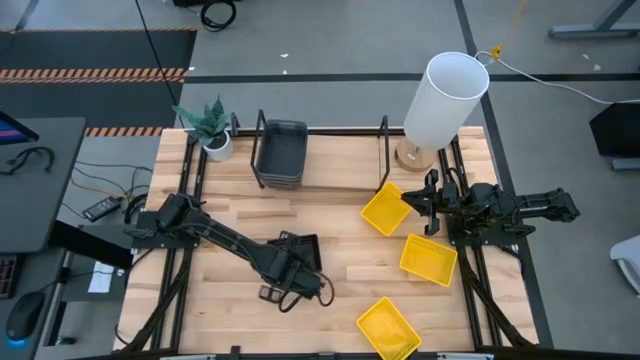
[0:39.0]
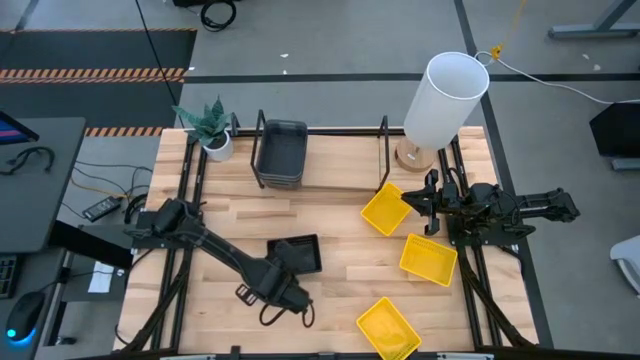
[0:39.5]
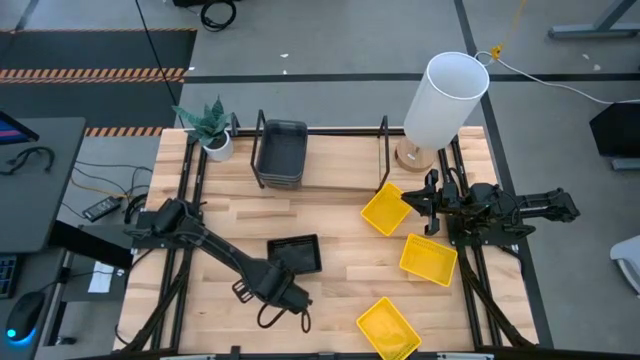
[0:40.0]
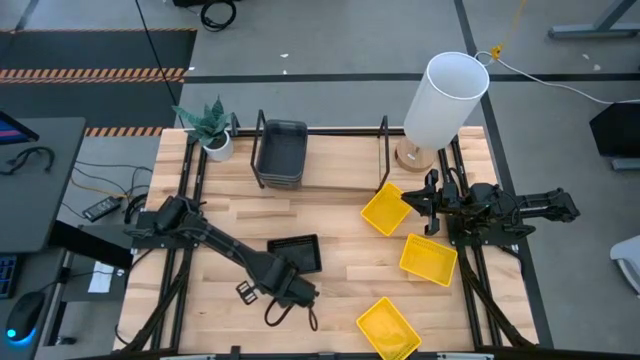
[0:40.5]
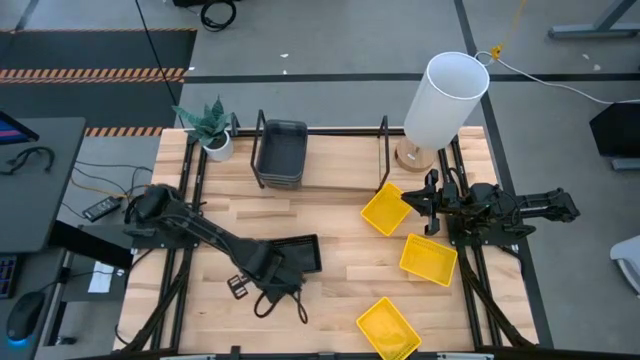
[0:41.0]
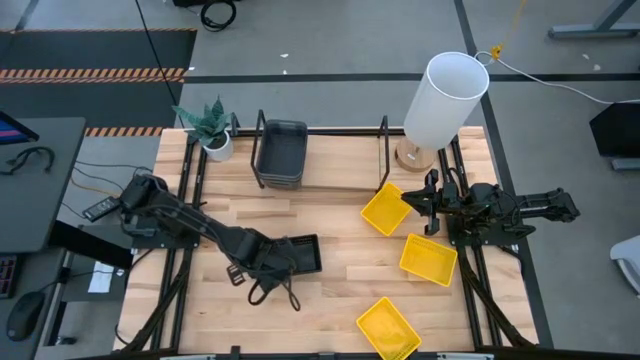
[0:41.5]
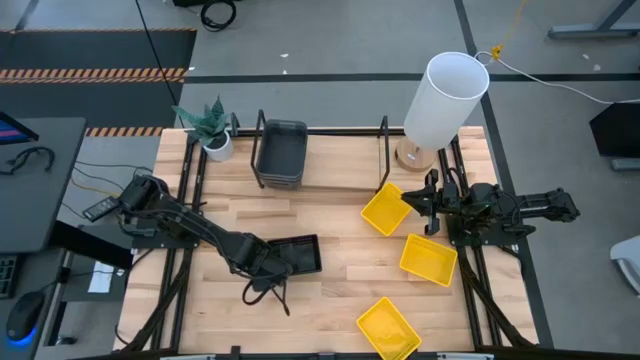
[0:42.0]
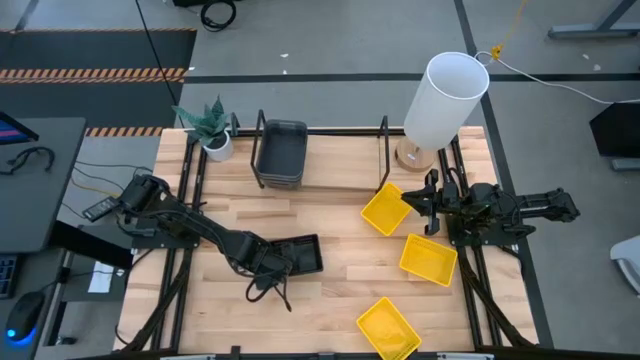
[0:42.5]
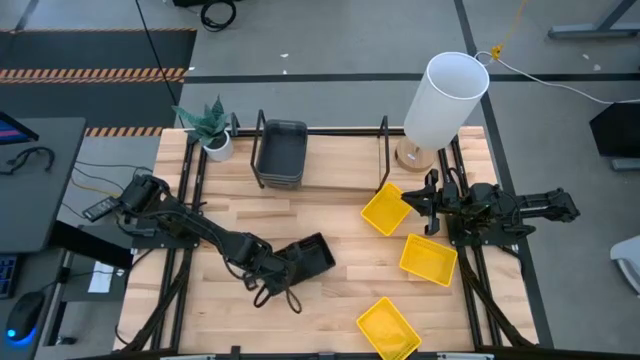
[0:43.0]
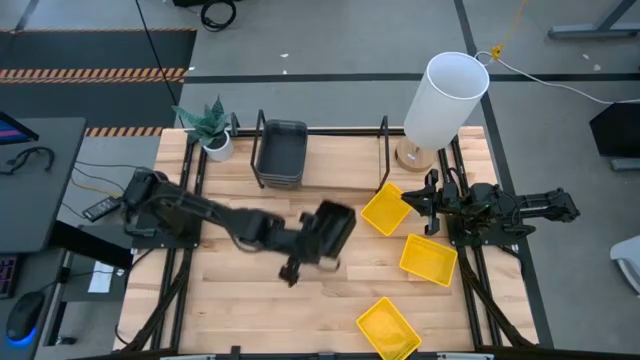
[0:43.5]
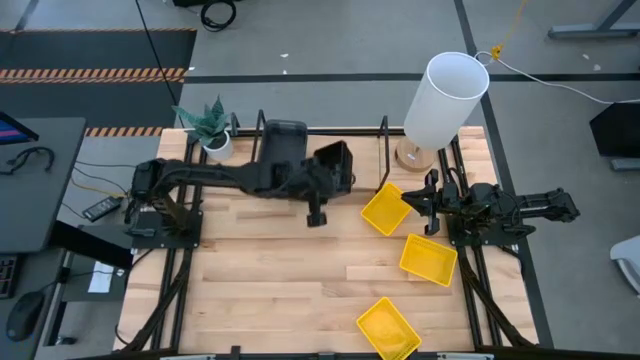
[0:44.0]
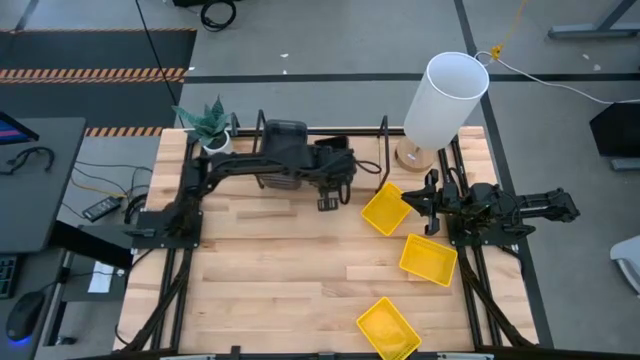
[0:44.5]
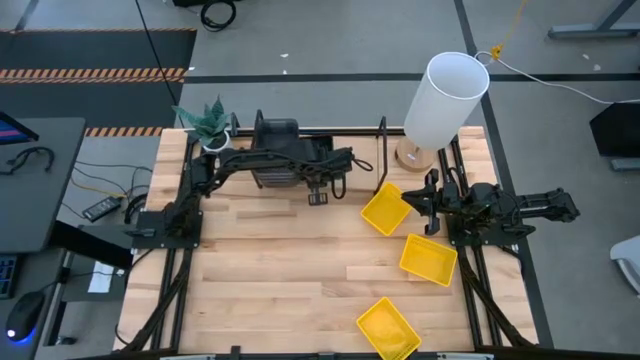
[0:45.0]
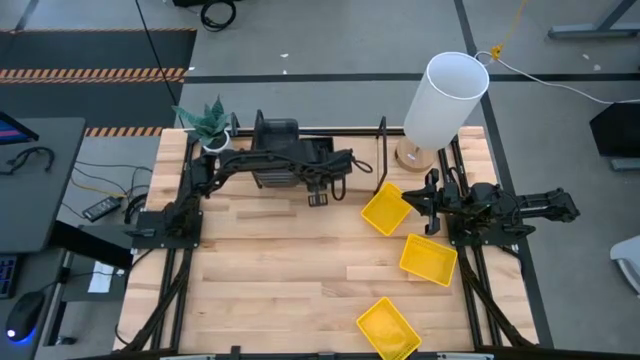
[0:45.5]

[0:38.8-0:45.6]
Task: Stack baskets on shelf by color
Put the stacked black baskets on the shelf

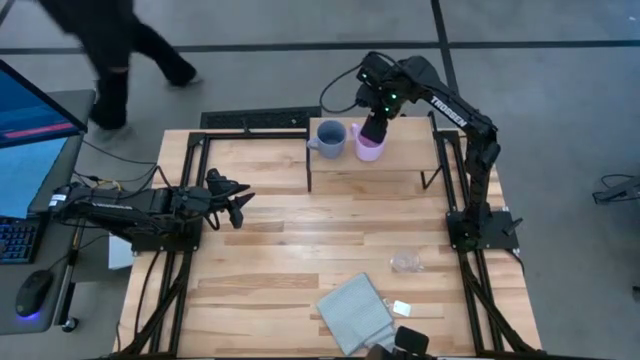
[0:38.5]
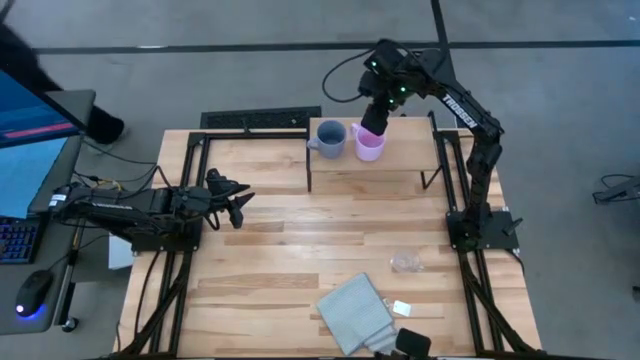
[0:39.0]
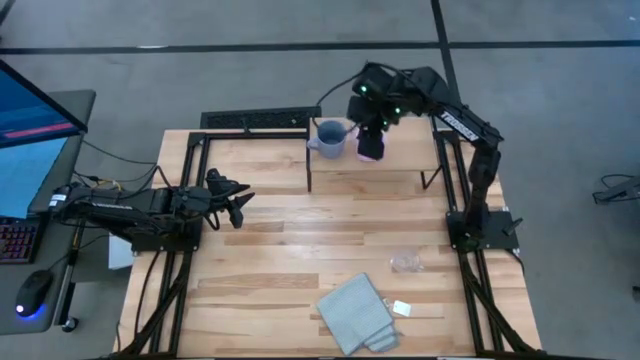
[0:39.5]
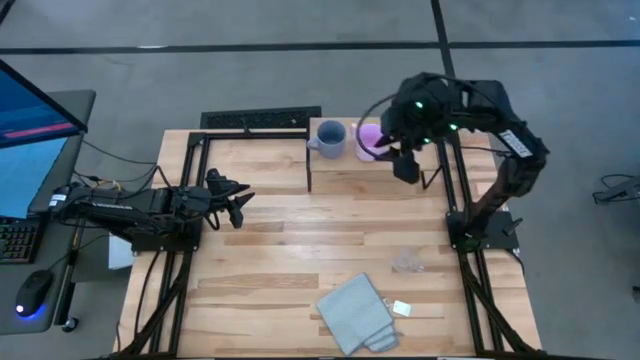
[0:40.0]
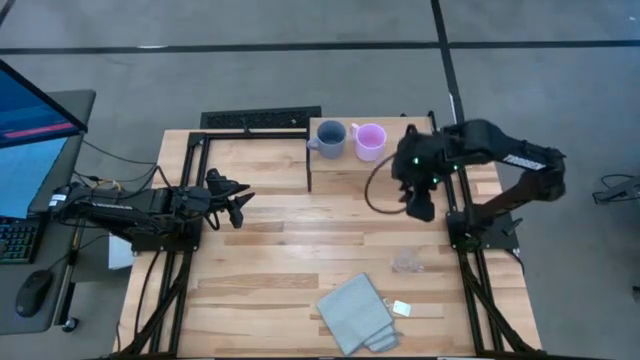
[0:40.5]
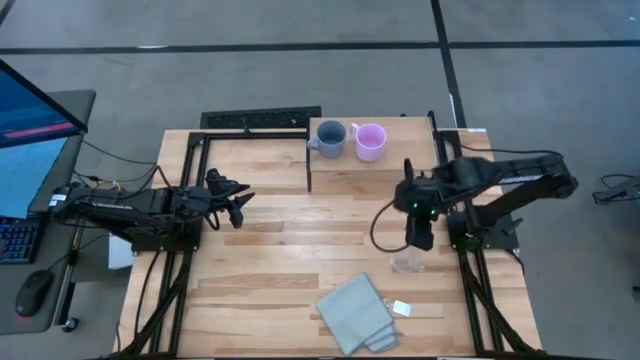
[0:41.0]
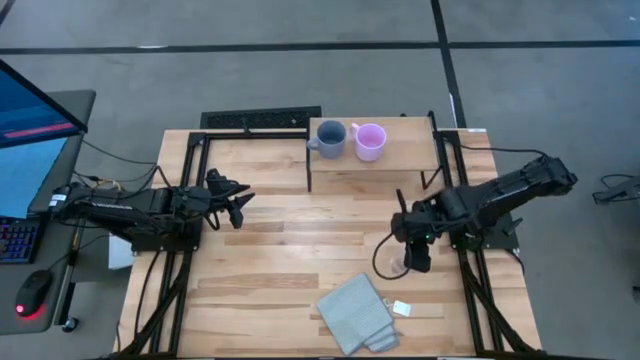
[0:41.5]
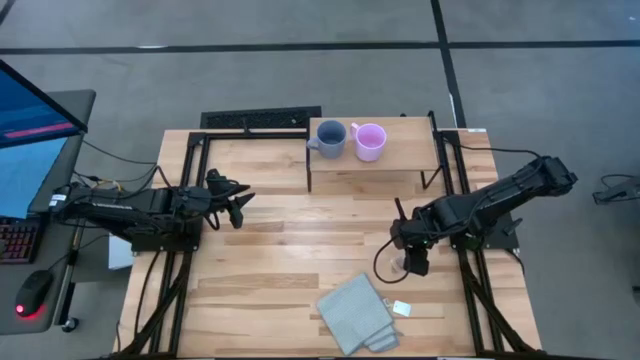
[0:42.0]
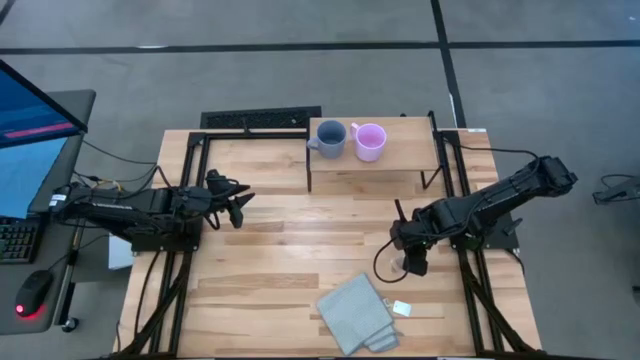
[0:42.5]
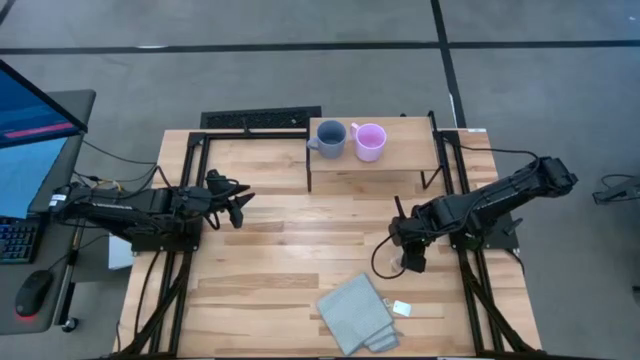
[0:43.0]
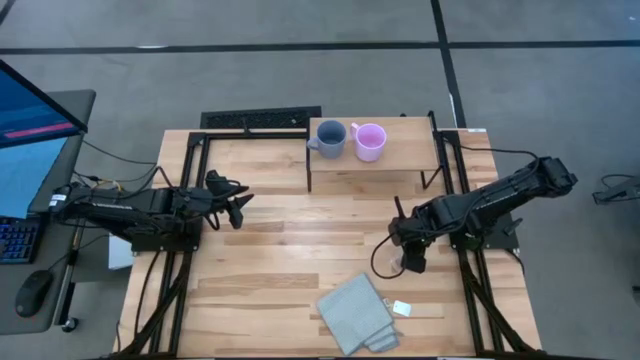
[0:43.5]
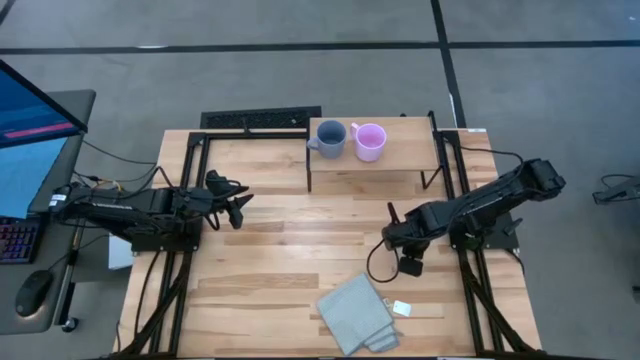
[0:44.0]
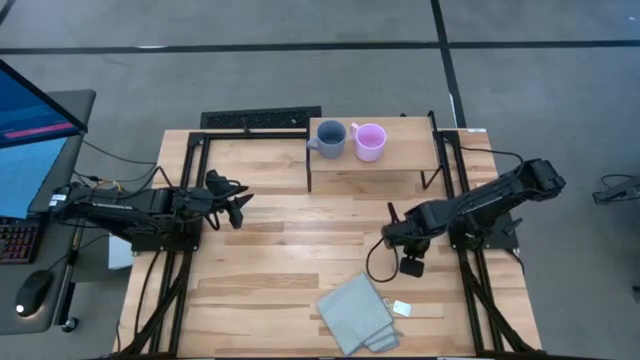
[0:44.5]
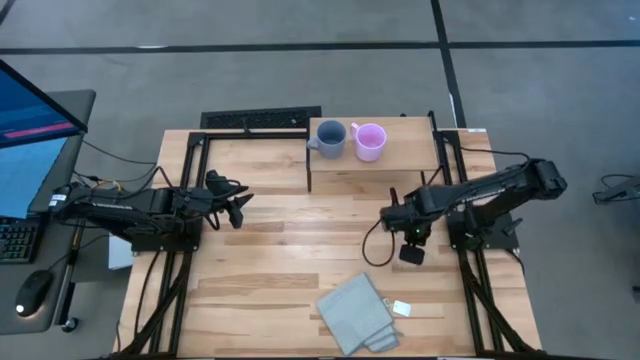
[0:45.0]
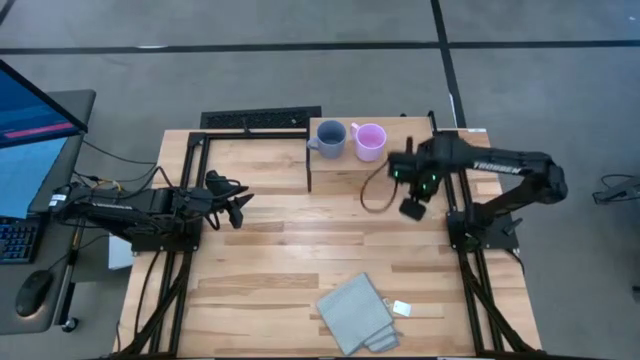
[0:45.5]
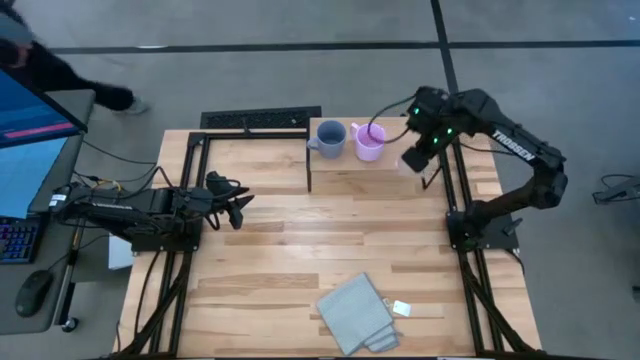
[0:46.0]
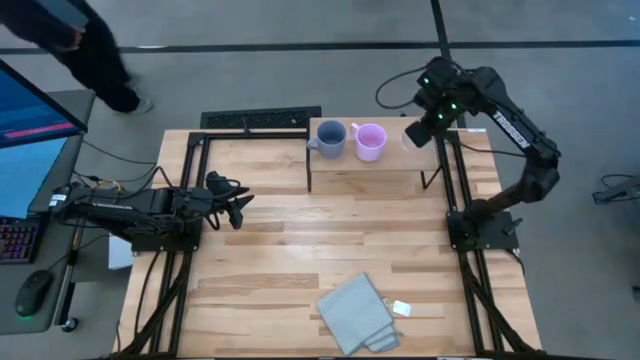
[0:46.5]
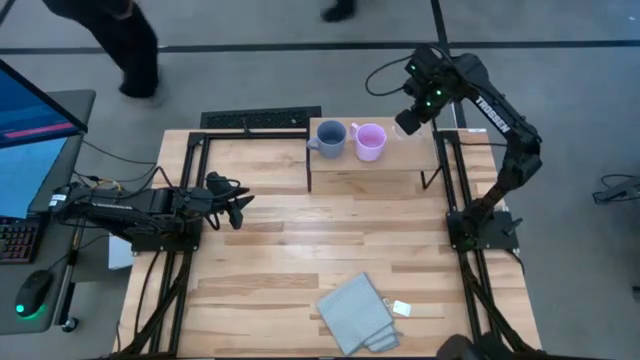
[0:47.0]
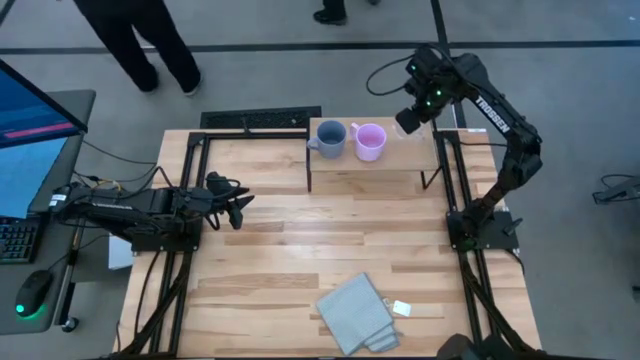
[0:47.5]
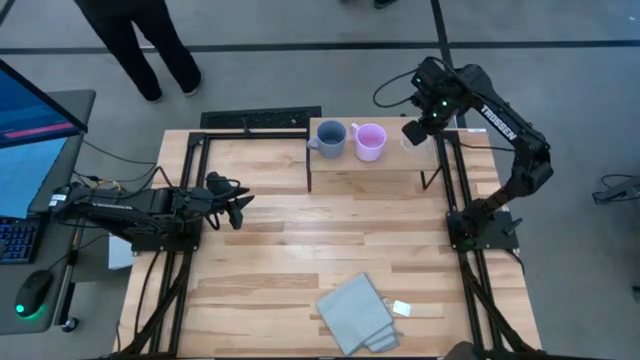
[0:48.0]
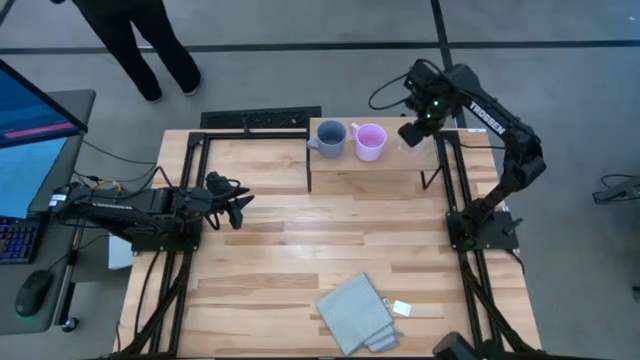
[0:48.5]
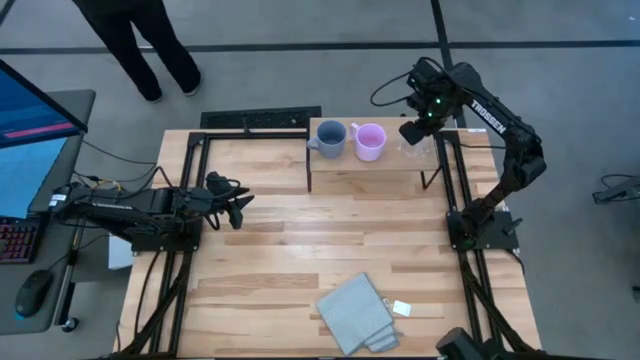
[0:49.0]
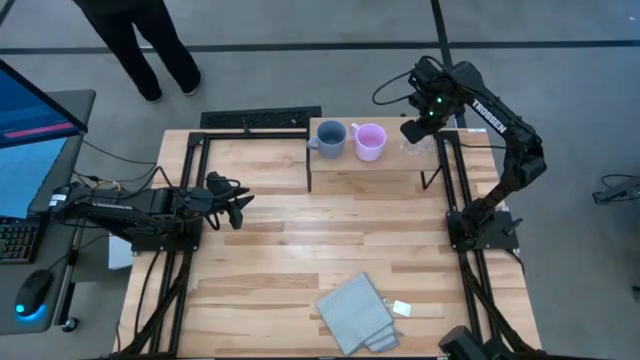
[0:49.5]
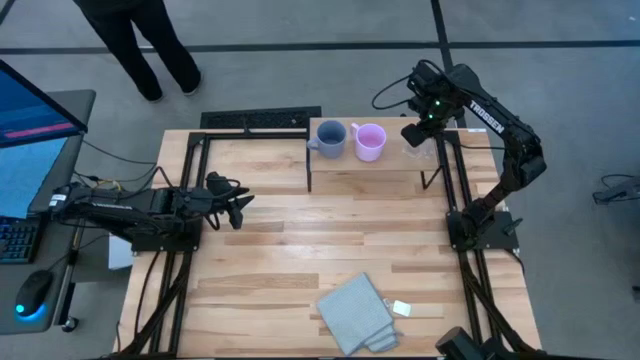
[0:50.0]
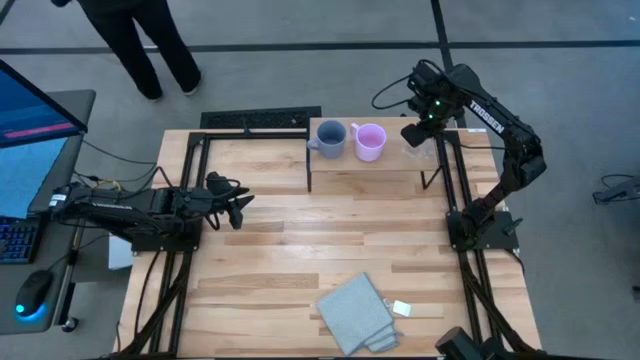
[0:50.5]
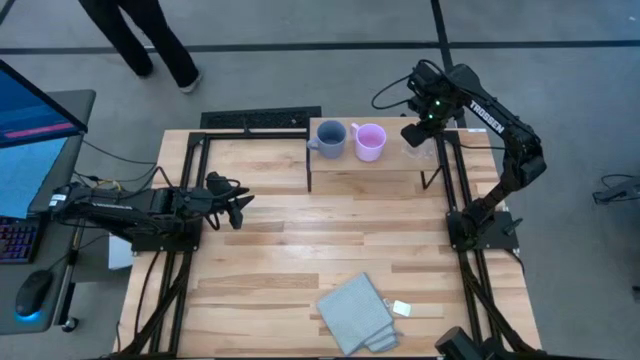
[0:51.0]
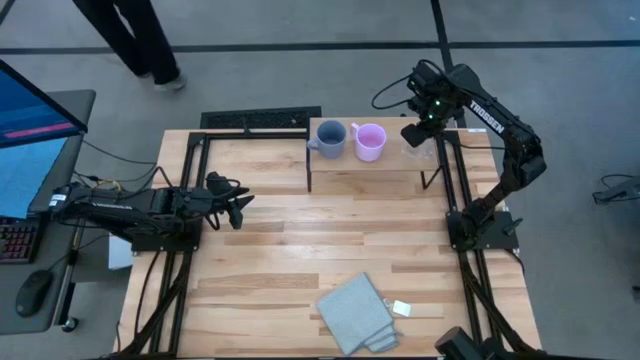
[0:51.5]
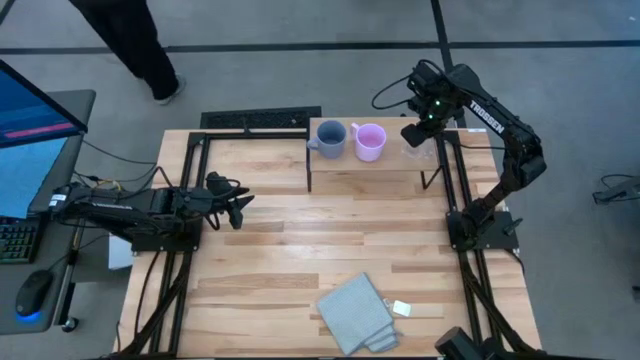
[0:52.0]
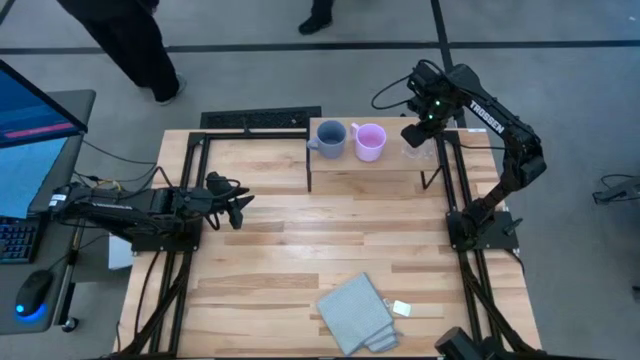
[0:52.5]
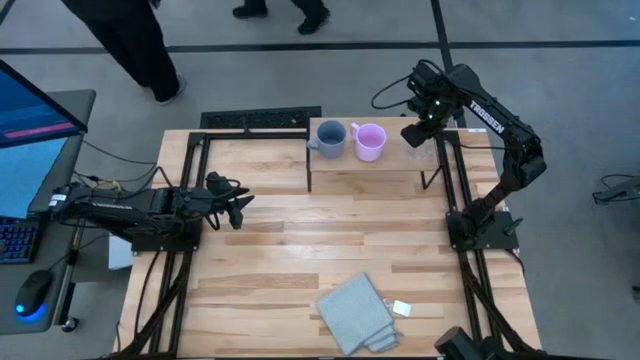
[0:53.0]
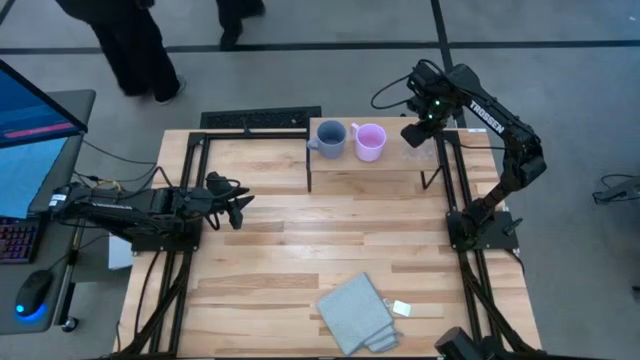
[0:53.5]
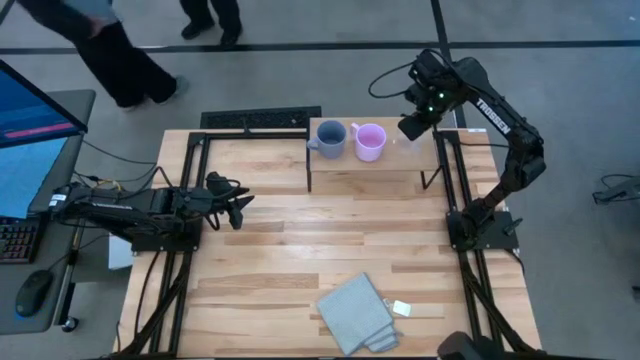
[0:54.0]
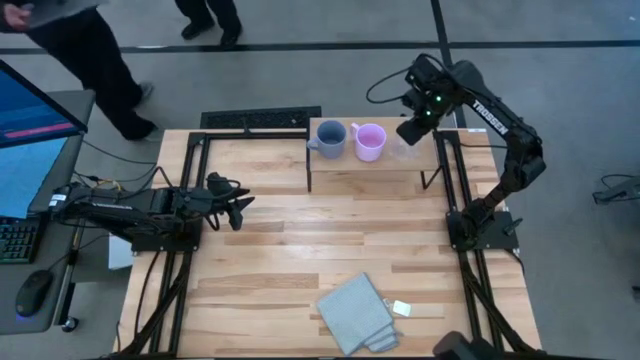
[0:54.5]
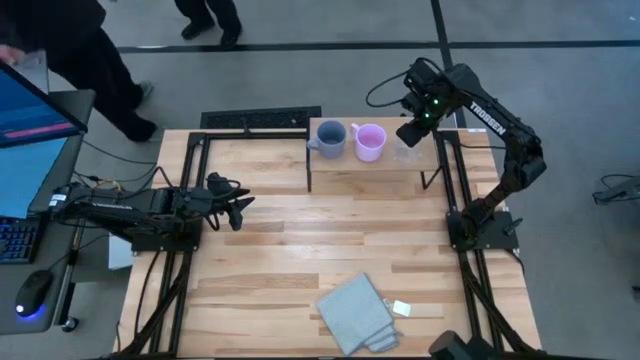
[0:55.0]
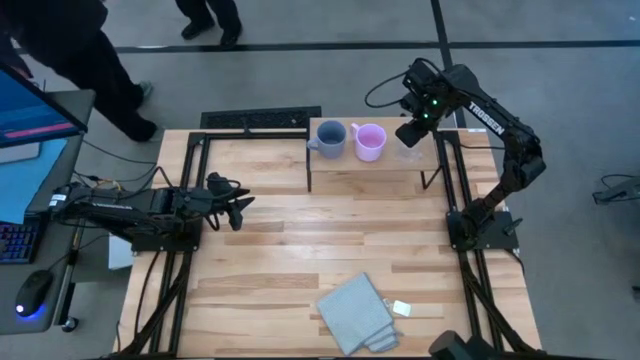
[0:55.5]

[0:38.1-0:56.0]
Task: Stack small to large cups/mugs on shelf
Put the transparent mug on the shelf
